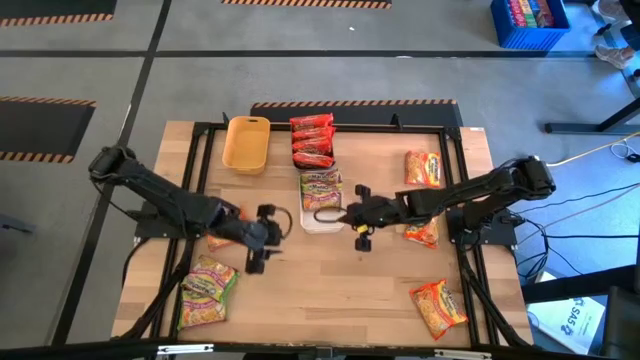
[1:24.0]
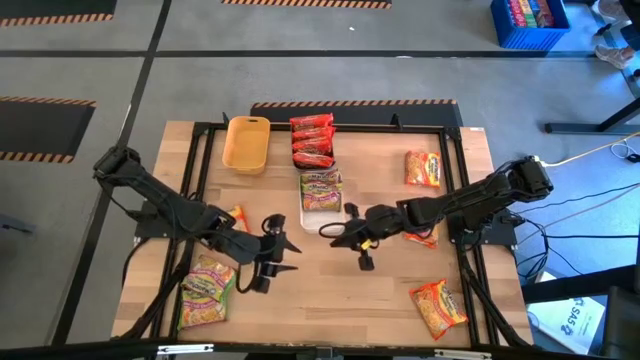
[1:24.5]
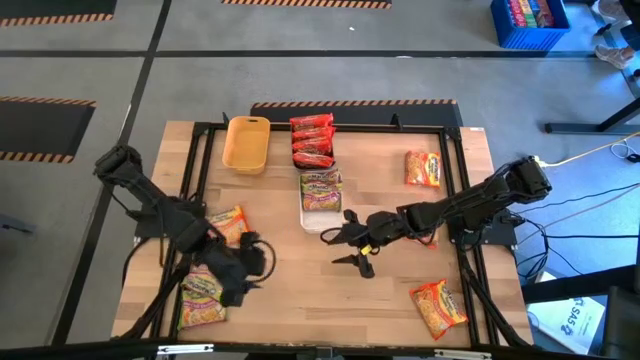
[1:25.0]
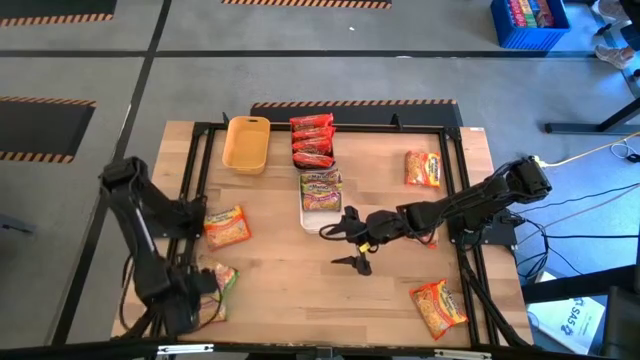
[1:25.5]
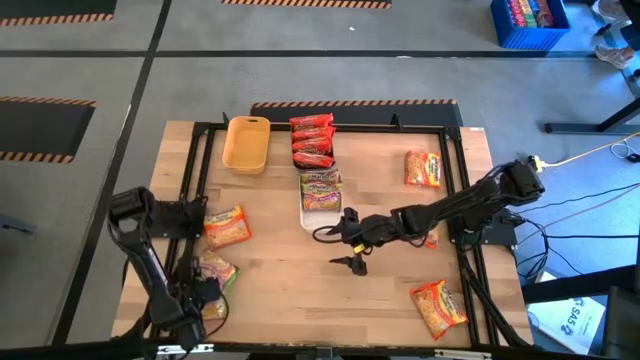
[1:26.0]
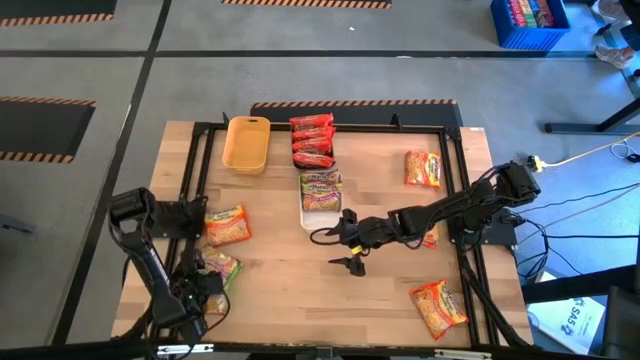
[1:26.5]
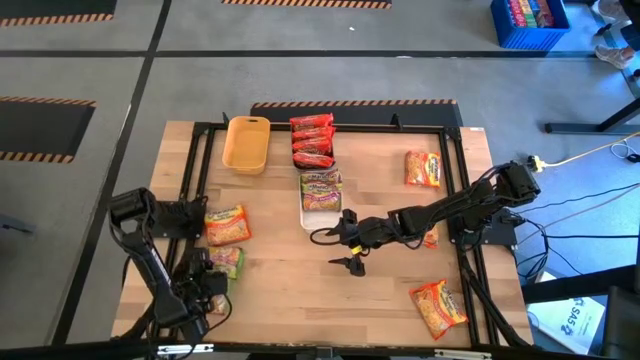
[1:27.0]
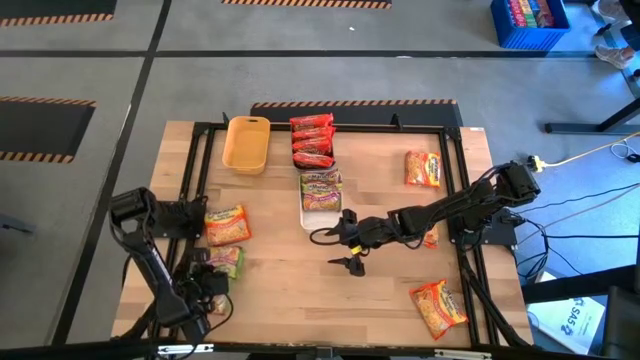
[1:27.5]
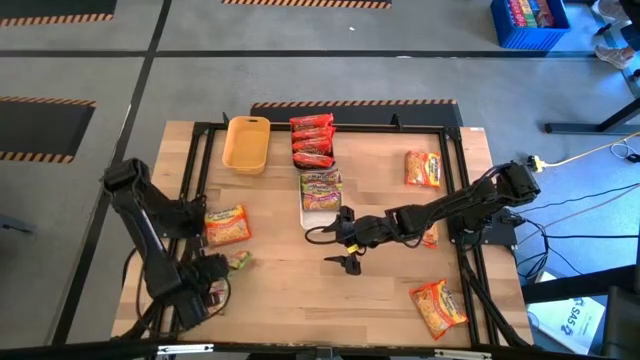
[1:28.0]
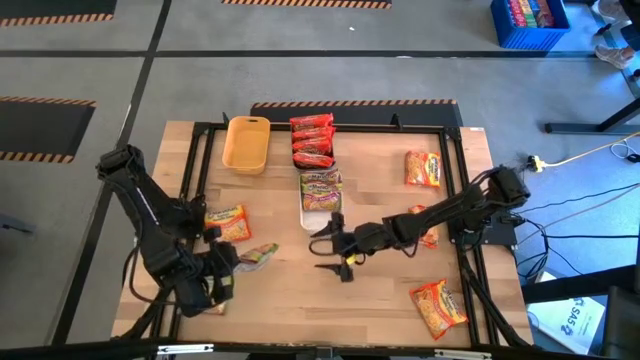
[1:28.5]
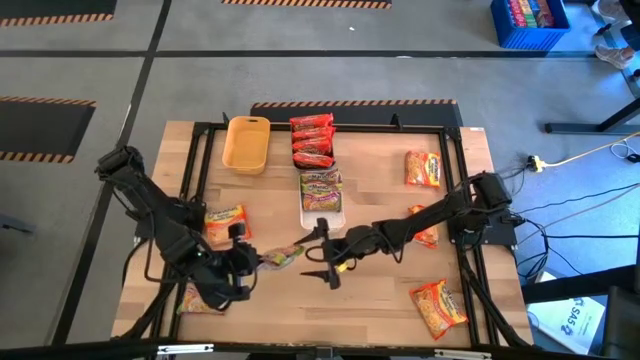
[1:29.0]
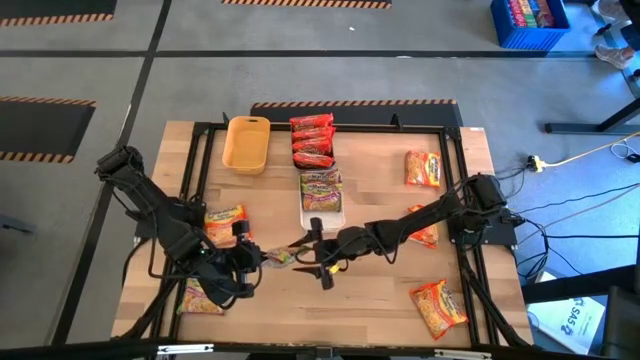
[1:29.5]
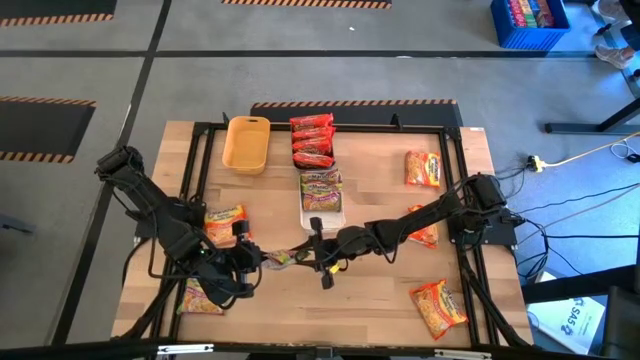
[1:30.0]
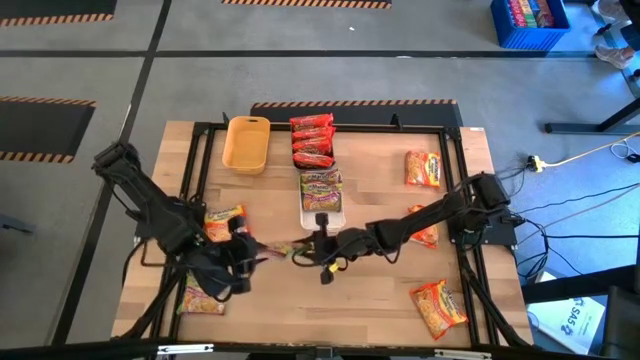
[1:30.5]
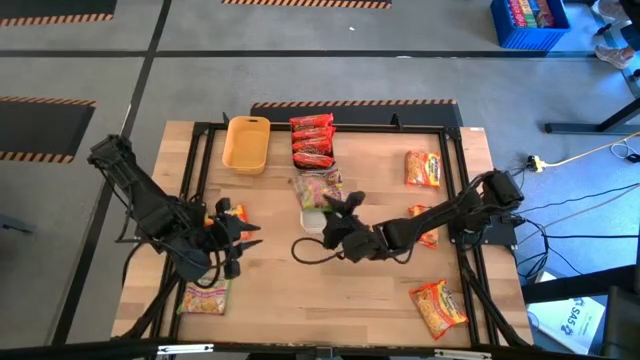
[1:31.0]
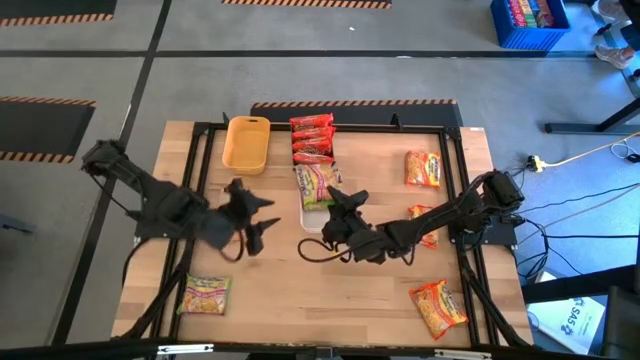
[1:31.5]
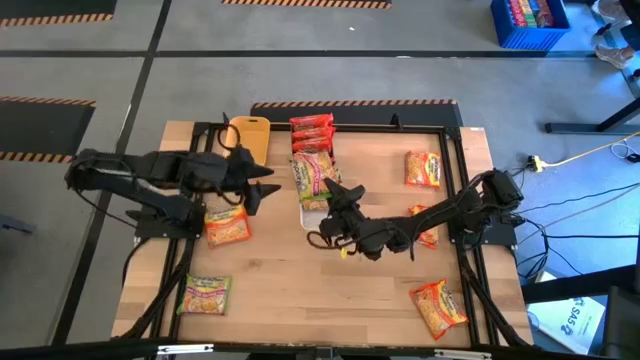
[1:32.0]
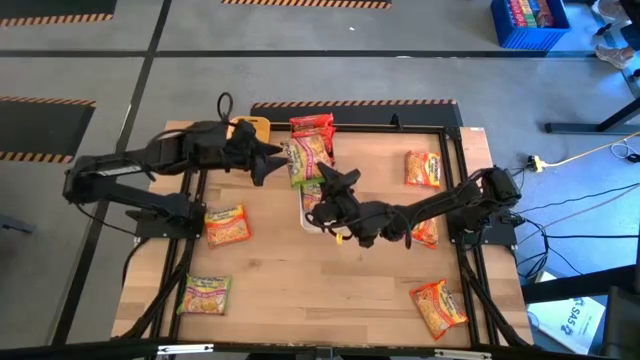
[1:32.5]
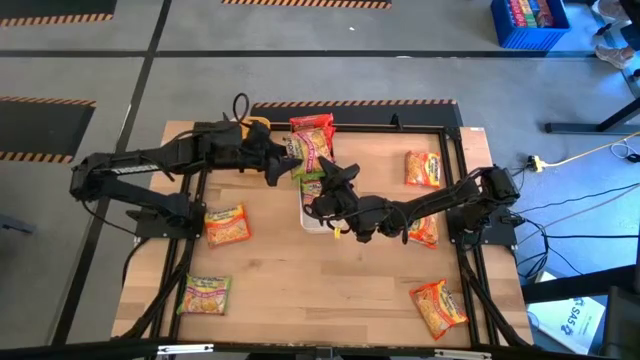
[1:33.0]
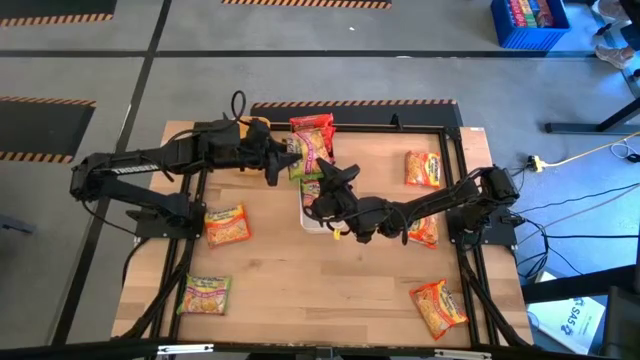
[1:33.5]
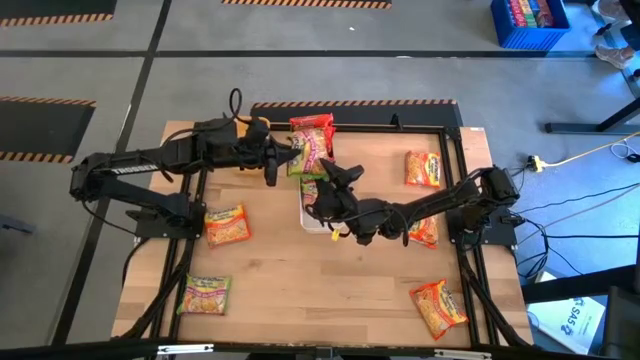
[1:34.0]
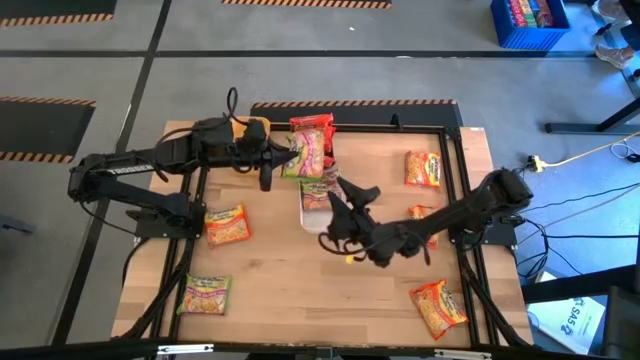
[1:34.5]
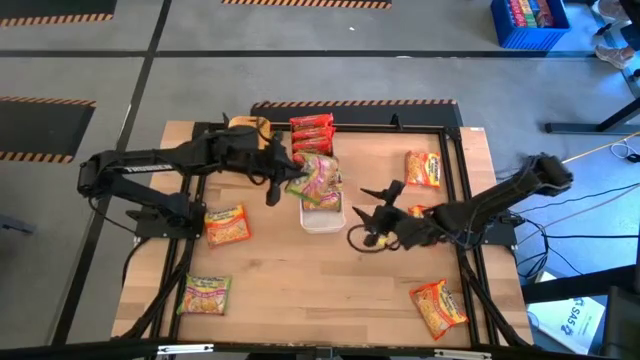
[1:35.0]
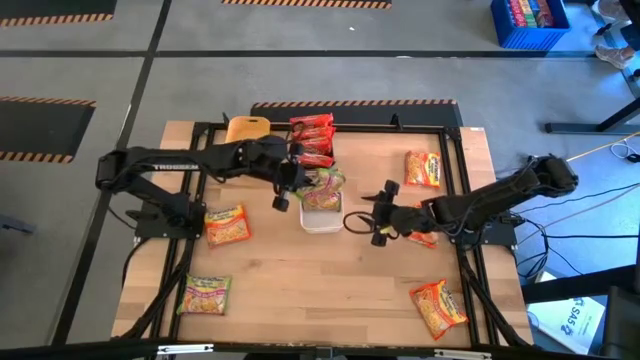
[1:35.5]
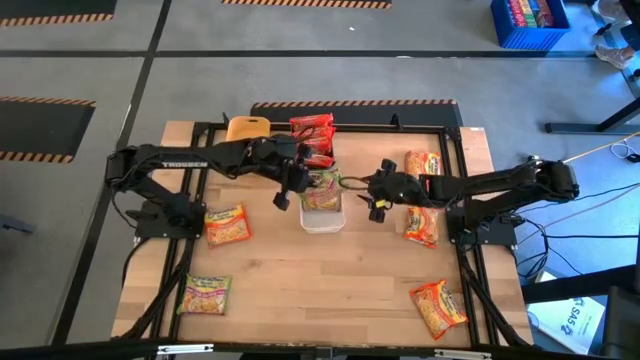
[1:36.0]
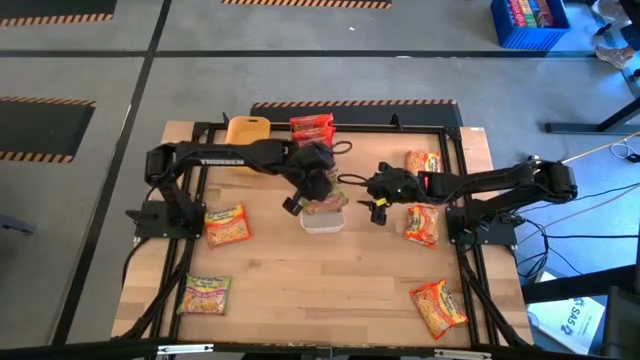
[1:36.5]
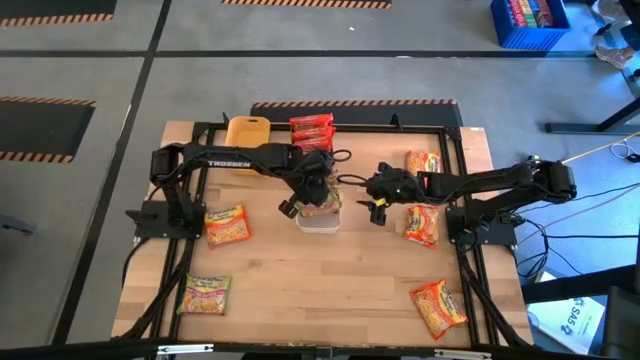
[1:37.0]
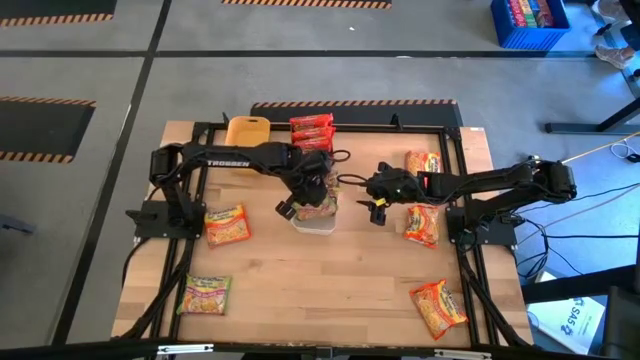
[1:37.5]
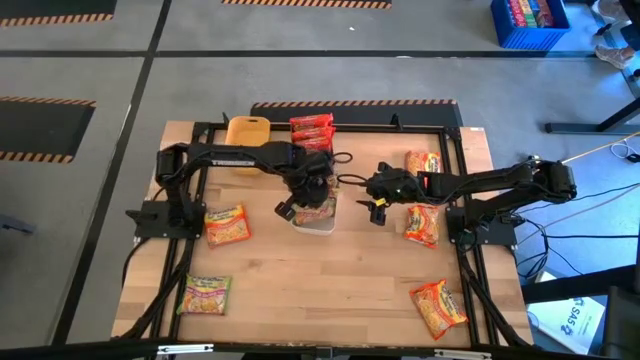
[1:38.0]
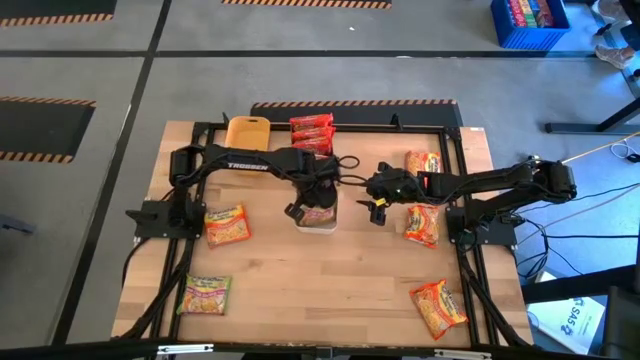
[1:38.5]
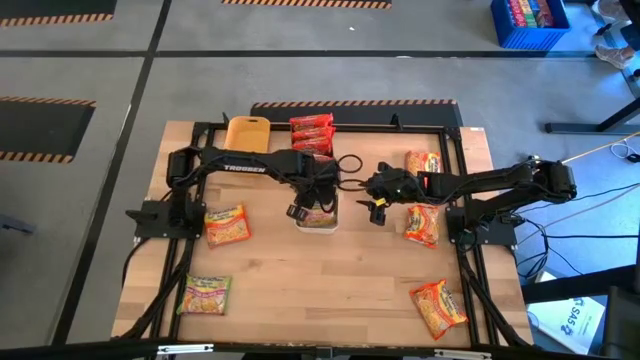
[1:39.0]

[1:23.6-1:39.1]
Task: Sort Maruchan noodles
Put the top green noodle pack into the white bin

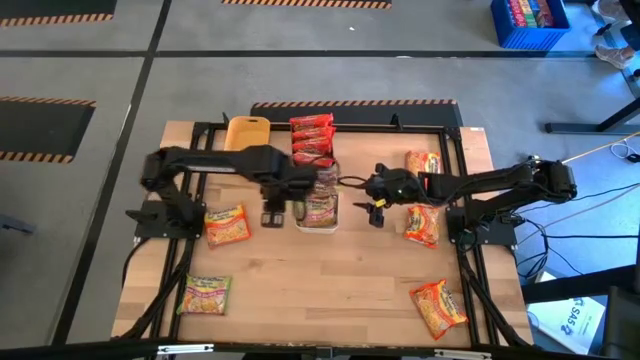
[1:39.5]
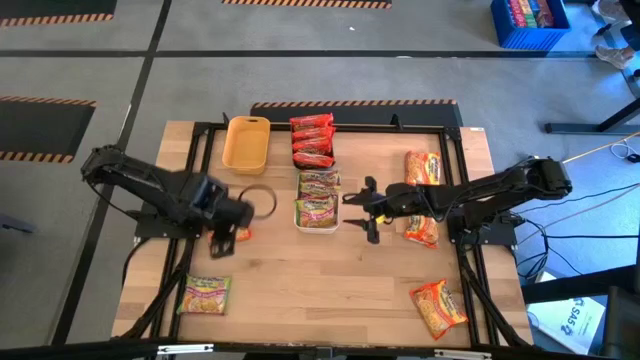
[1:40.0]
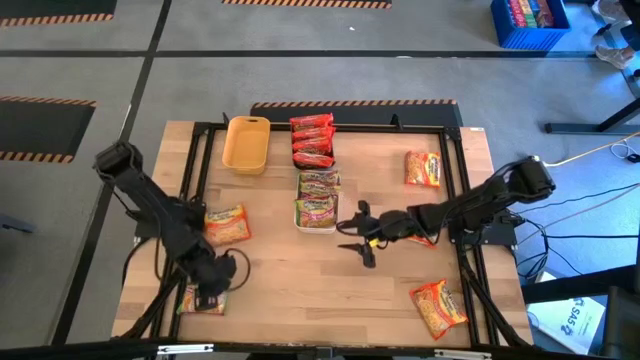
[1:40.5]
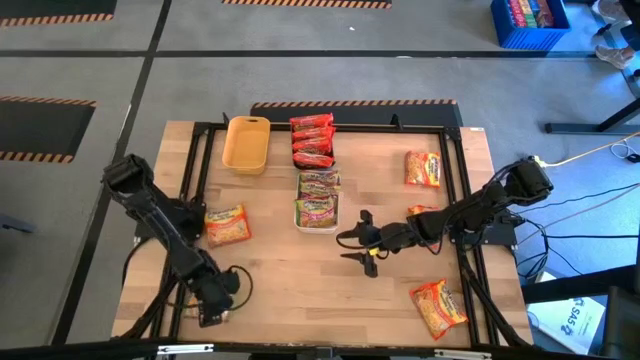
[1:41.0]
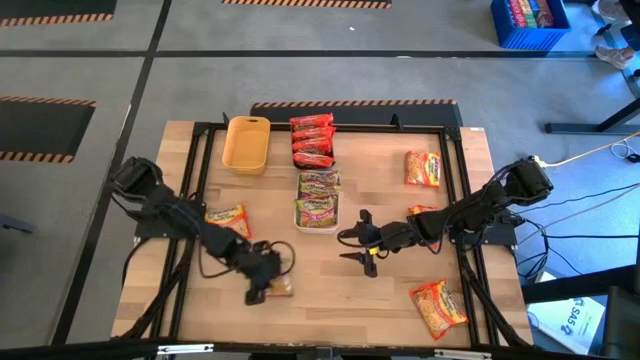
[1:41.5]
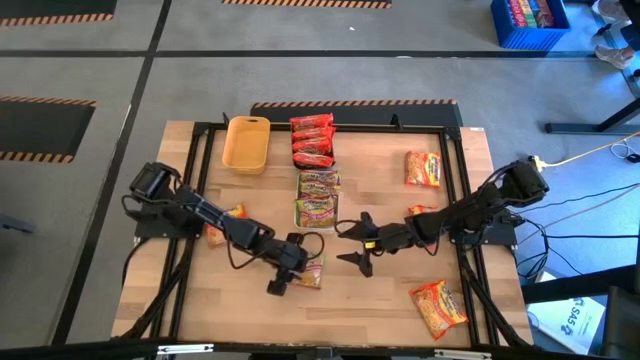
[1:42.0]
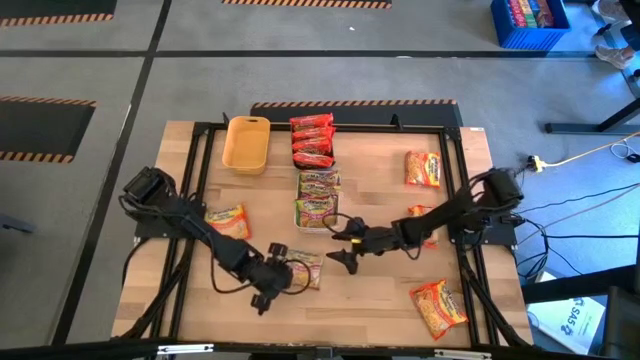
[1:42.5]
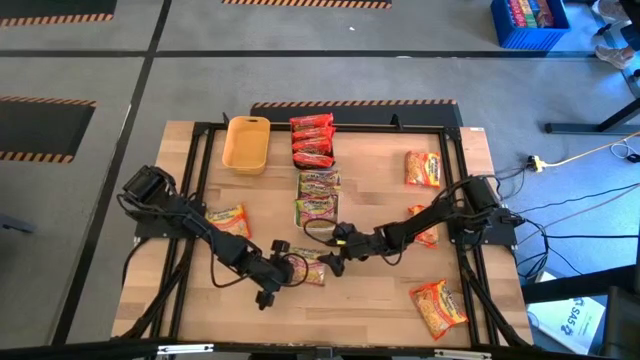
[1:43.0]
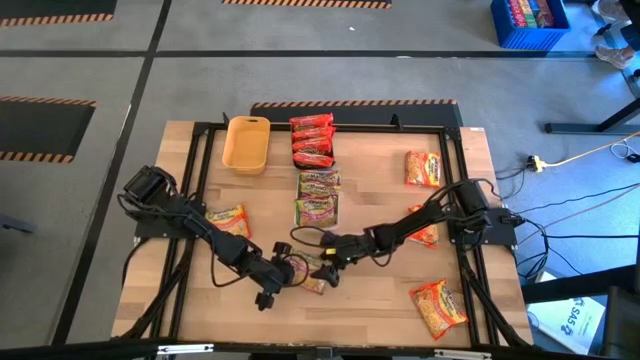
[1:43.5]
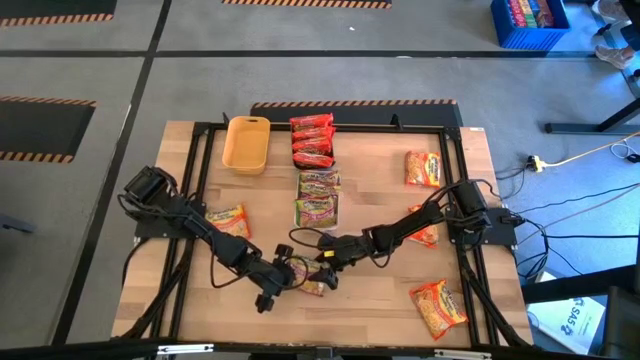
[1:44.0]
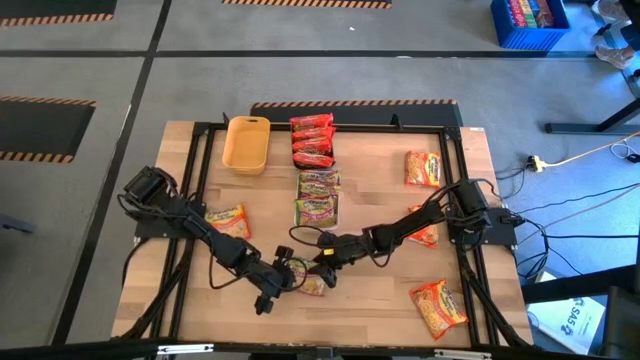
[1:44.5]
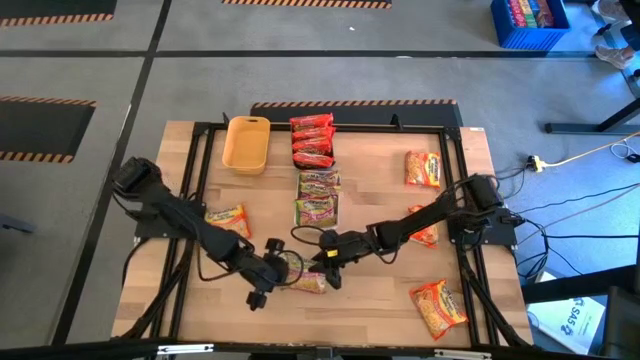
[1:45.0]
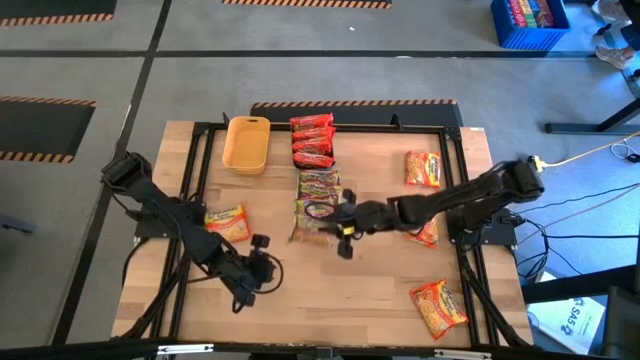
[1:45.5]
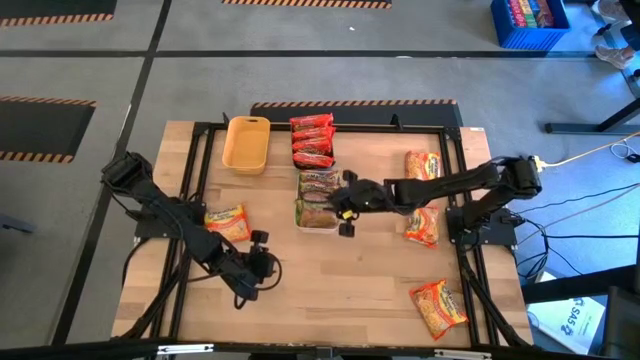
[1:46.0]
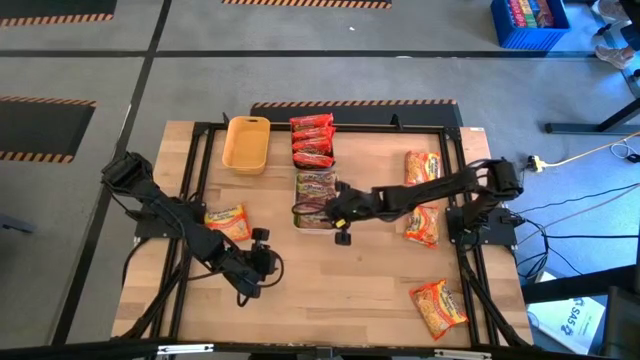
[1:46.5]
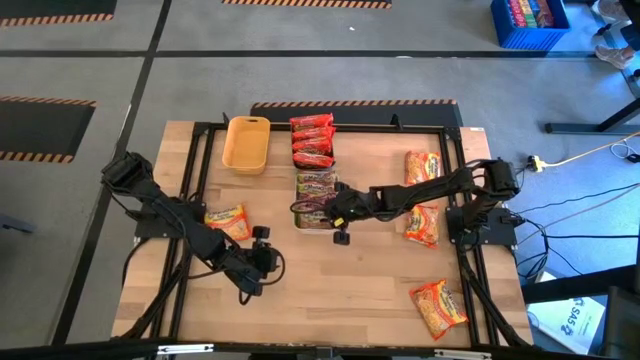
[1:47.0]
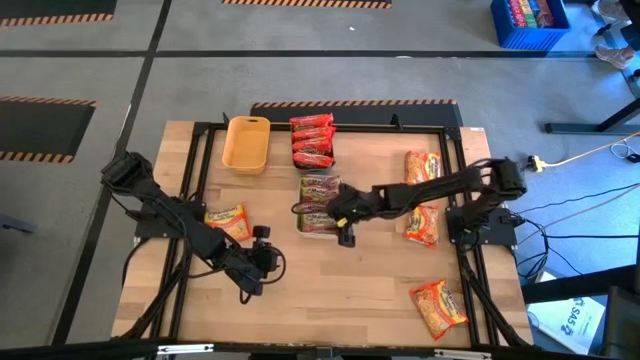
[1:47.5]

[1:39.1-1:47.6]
Put the green noodle pack into the white bin
